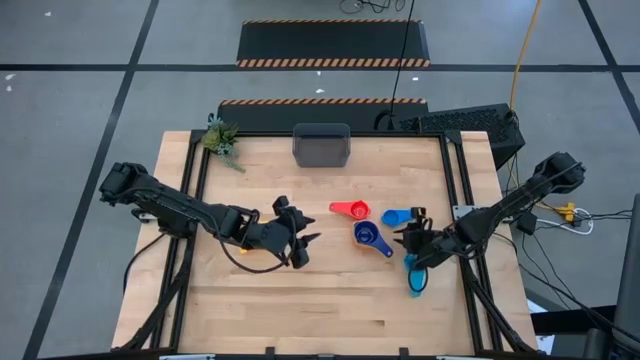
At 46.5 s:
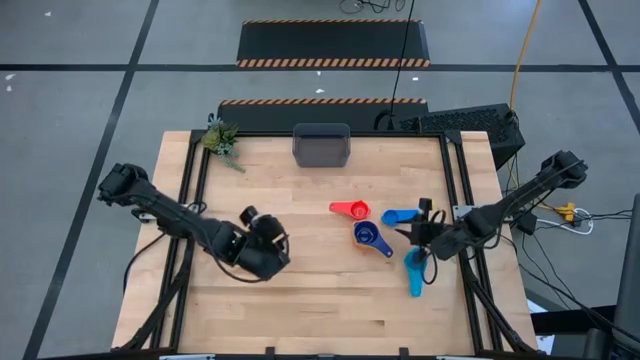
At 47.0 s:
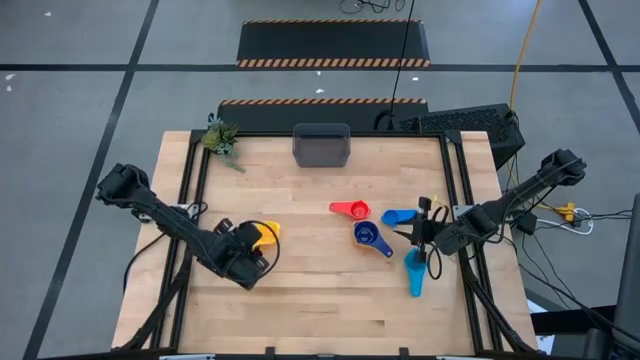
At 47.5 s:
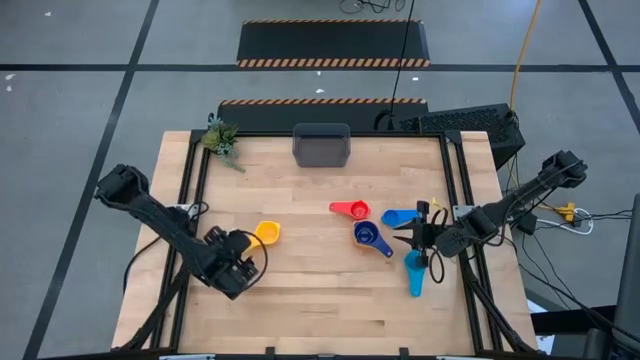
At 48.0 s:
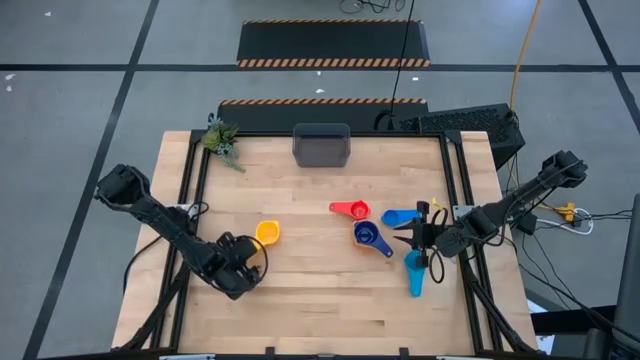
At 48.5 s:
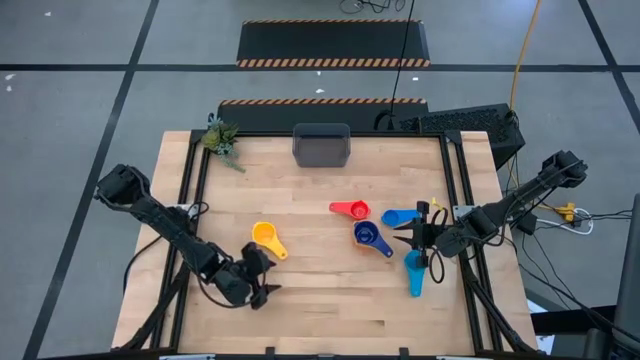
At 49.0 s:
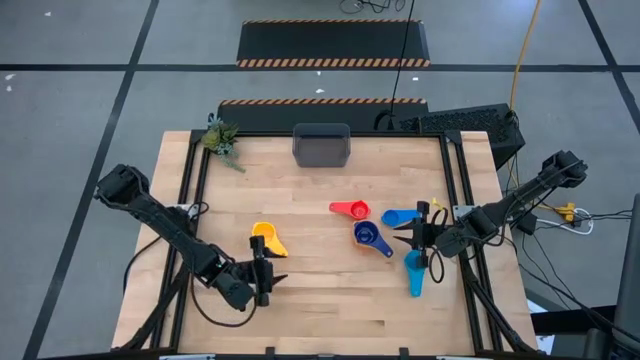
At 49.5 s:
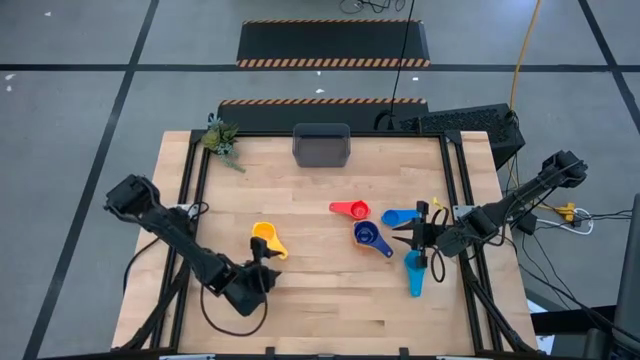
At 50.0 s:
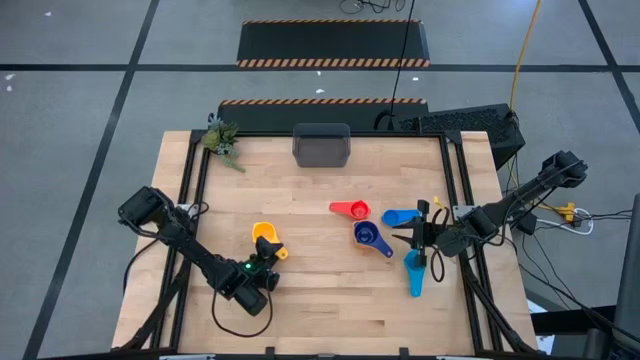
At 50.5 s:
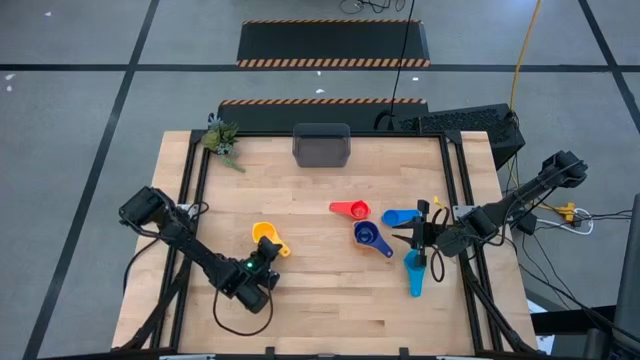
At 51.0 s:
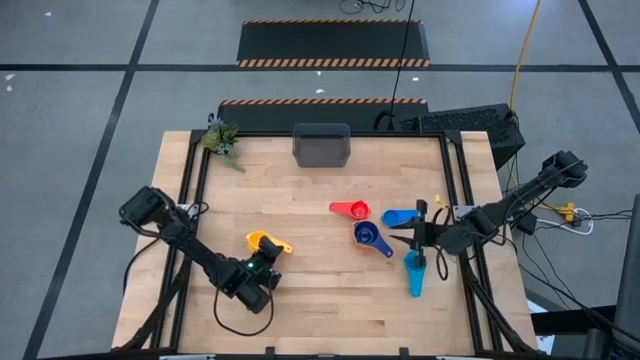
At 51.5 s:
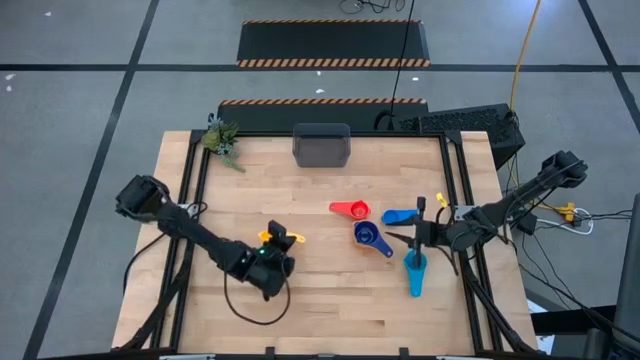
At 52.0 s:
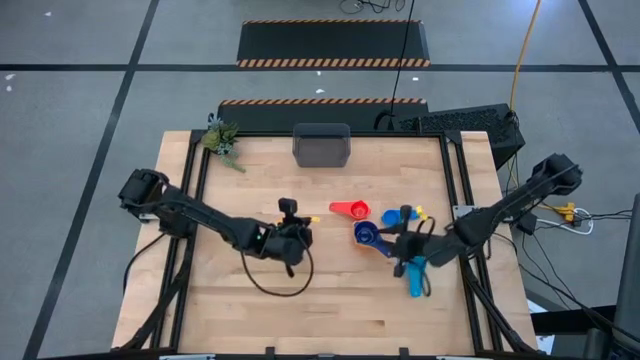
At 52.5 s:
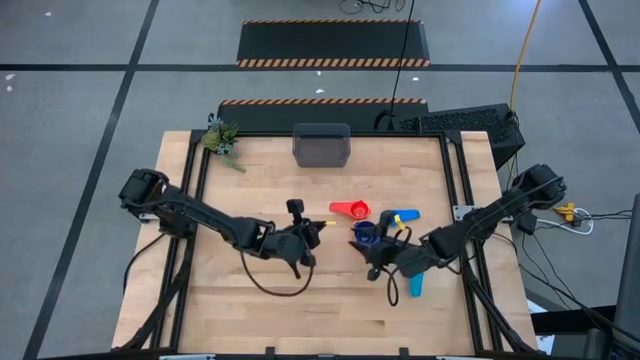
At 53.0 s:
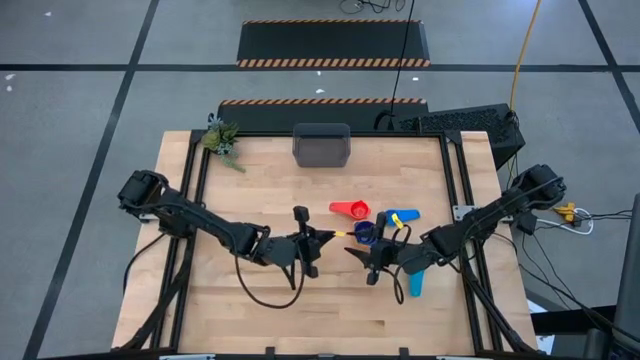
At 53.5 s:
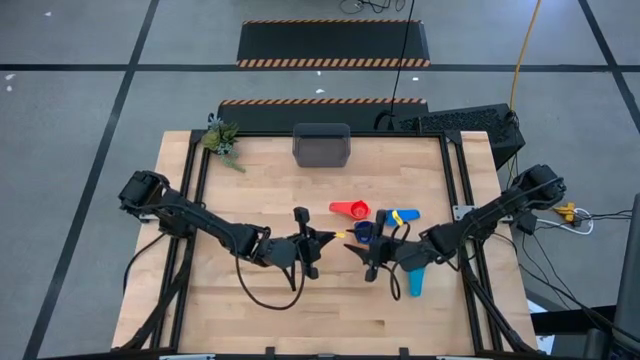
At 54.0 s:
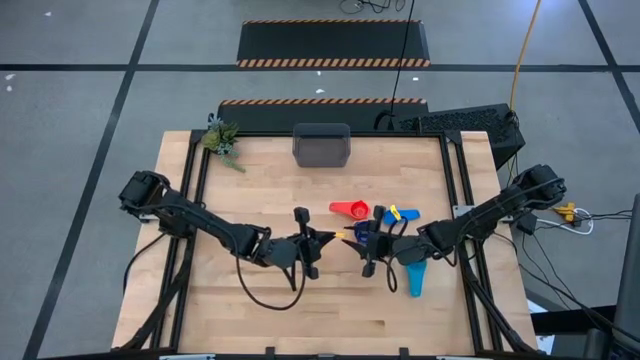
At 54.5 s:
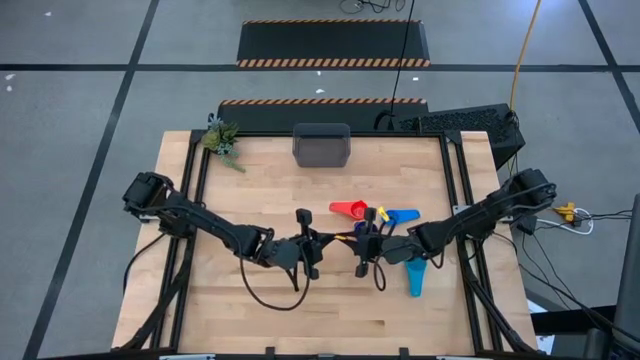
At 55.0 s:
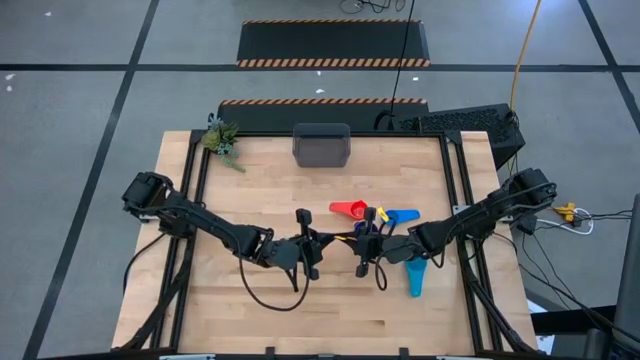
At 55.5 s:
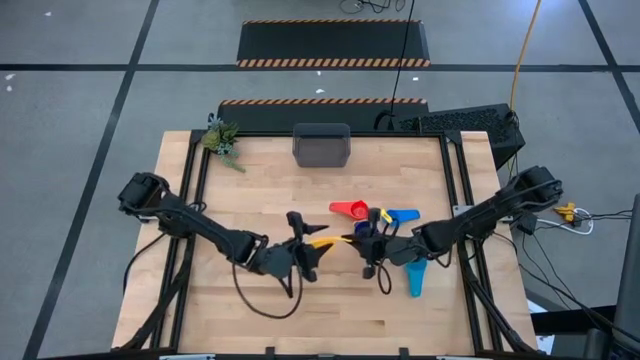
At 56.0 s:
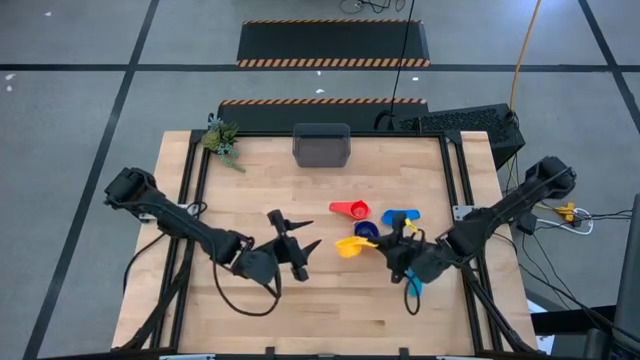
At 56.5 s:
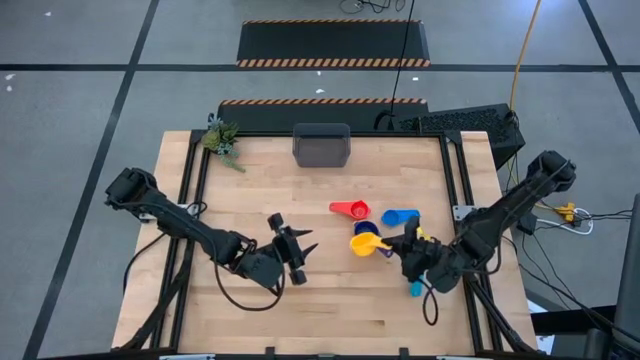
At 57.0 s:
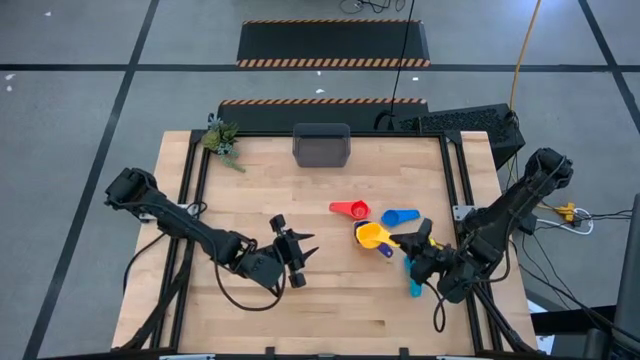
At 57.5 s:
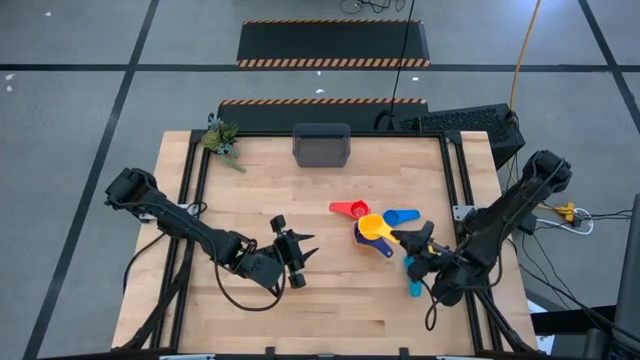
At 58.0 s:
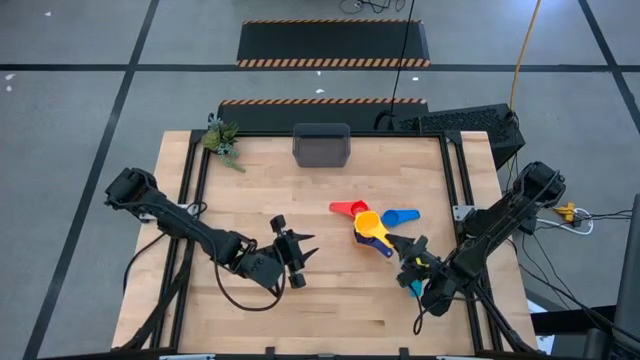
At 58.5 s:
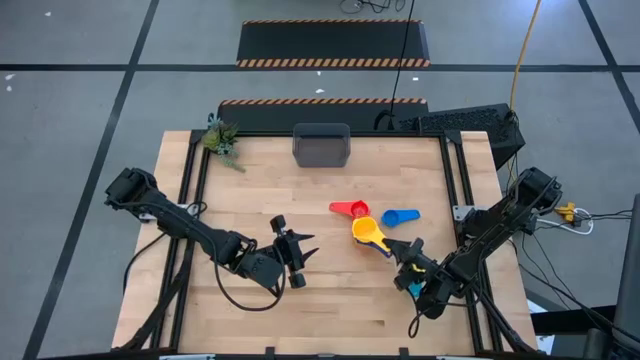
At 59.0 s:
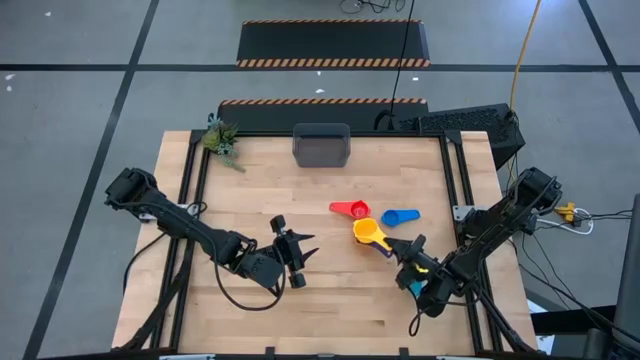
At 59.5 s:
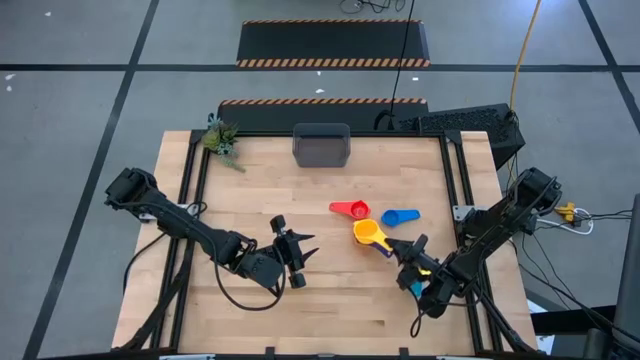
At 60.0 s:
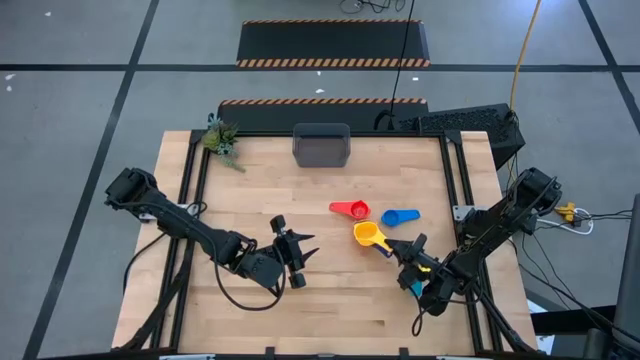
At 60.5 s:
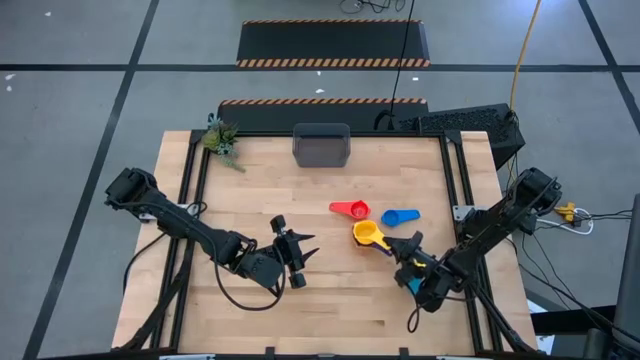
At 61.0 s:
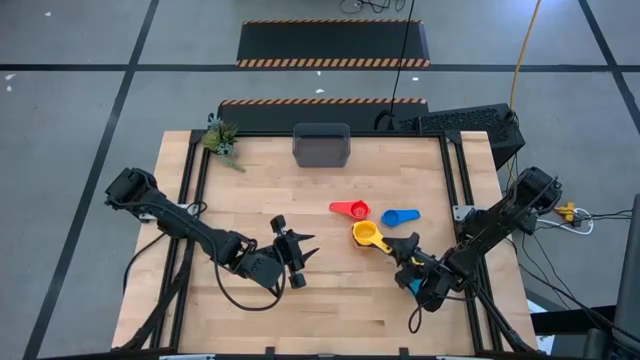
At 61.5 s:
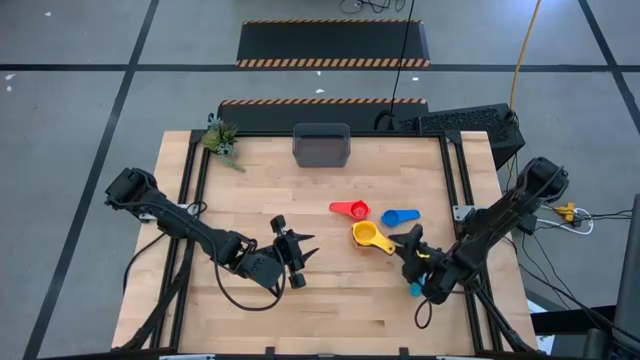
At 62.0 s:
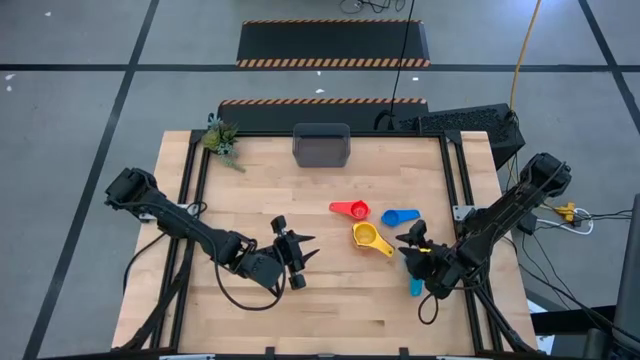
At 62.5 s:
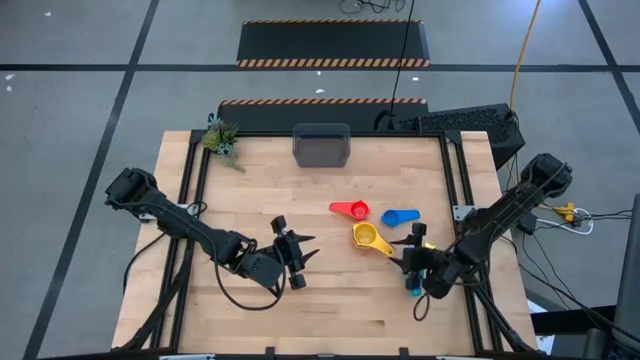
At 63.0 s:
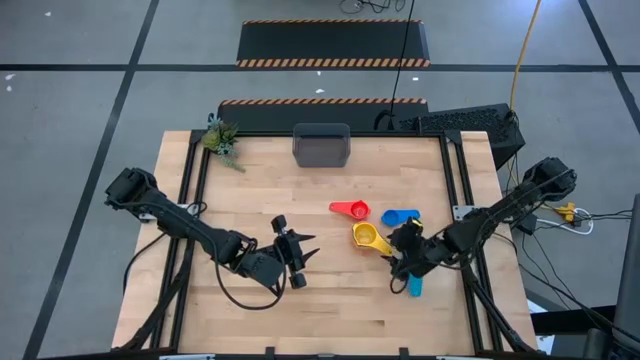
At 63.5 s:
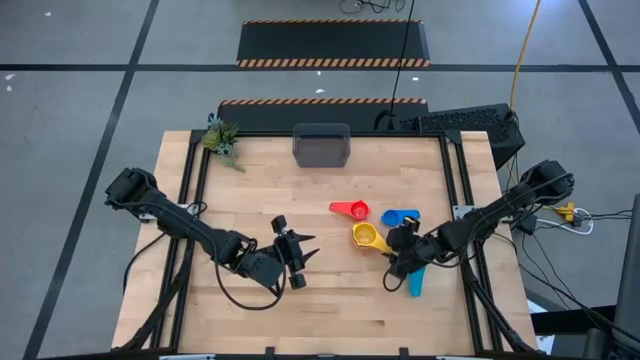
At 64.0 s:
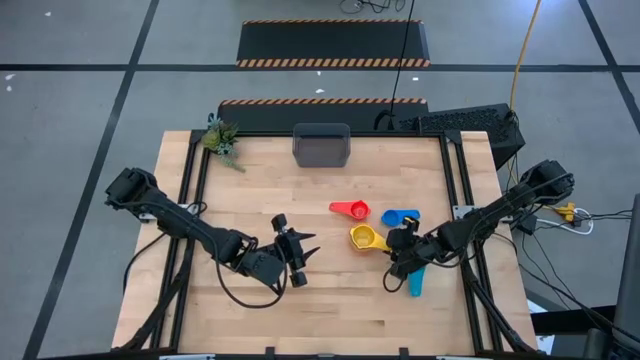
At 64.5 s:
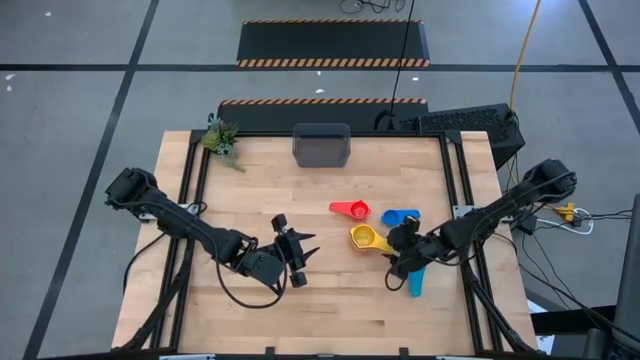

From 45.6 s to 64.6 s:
Task: Nest measuring cups in basket
Stack the yellow measuring cup on top of the dark blue measuring cup

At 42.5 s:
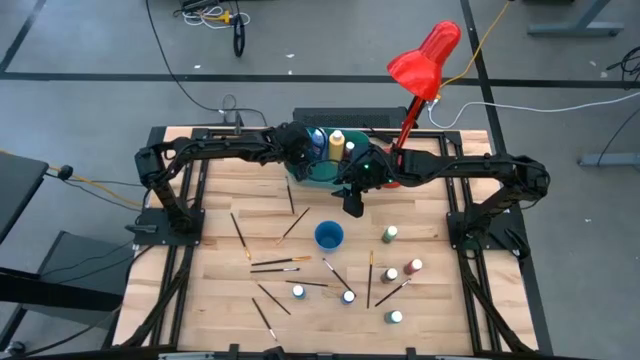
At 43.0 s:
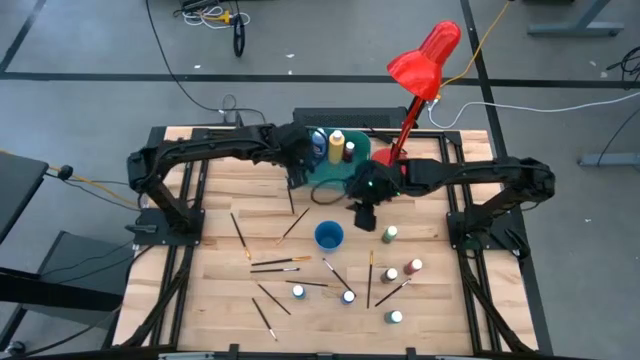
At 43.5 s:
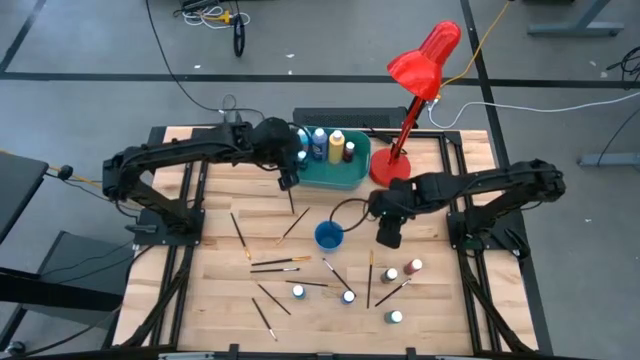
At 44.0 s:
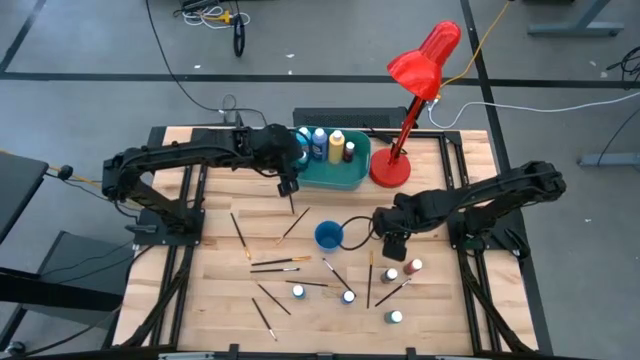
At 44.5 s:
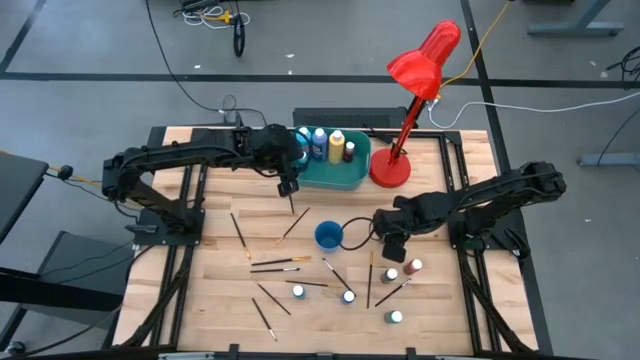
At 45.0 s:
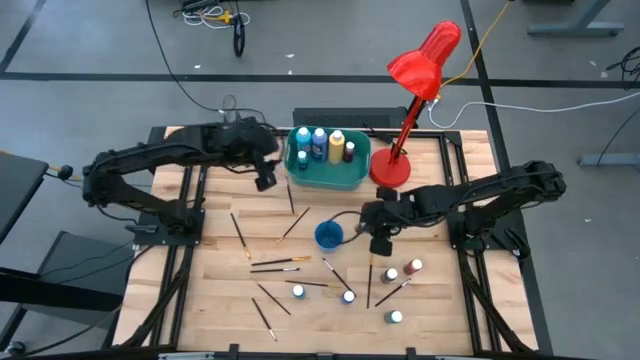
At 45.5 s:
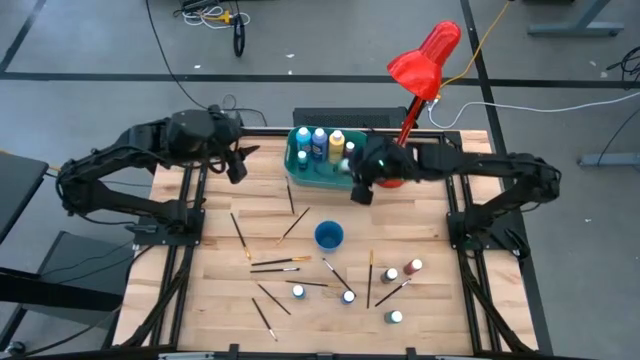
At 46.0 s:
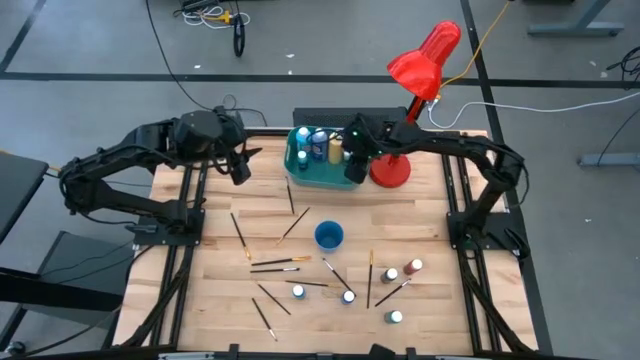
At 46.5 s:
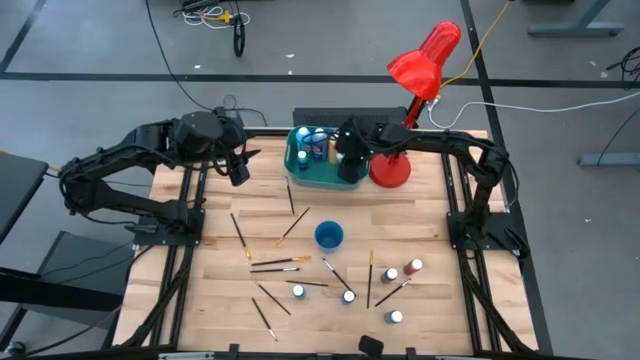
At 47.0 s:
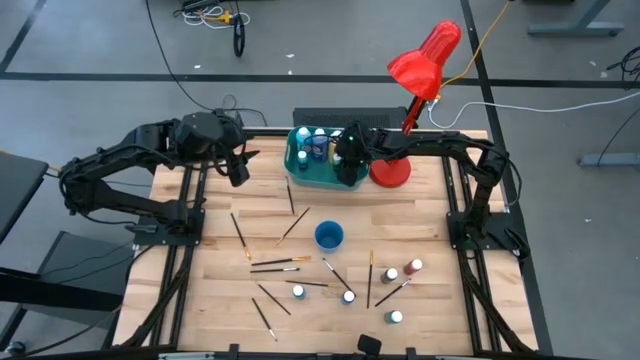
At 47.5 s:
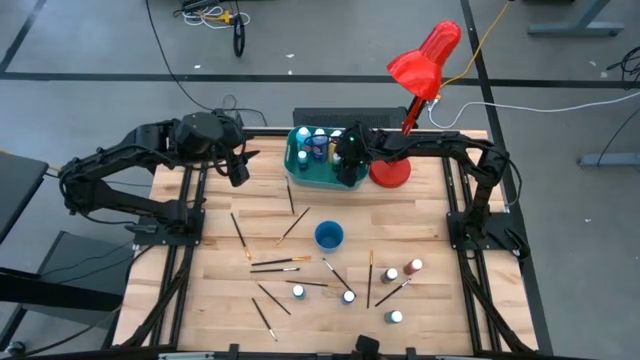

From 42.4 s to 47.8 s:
Task: Pick & Place Paint Supplies
Put the green paint bottle into the green bin
